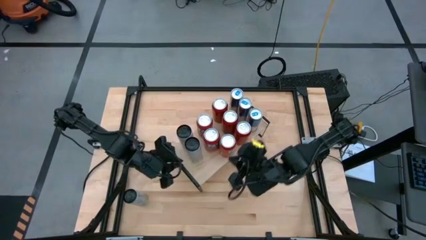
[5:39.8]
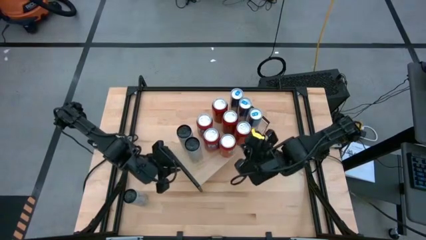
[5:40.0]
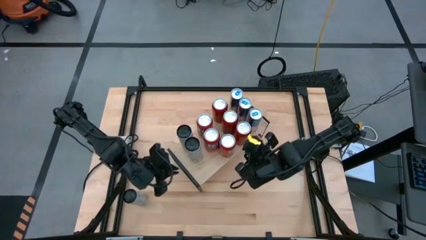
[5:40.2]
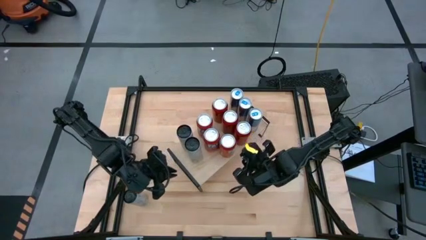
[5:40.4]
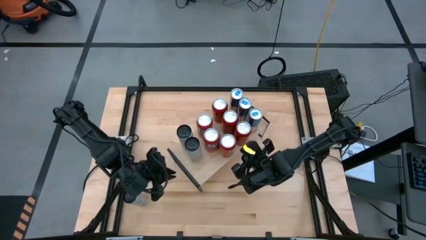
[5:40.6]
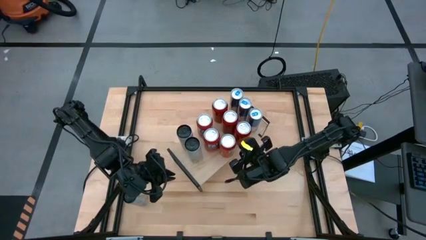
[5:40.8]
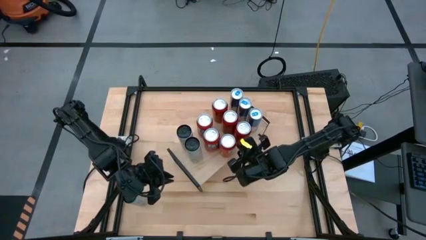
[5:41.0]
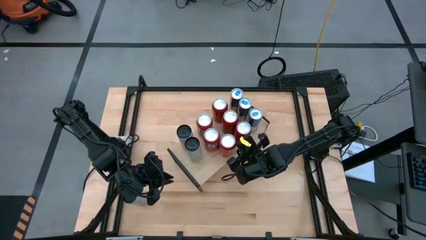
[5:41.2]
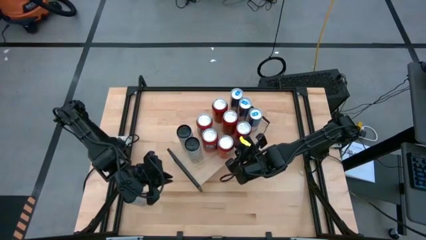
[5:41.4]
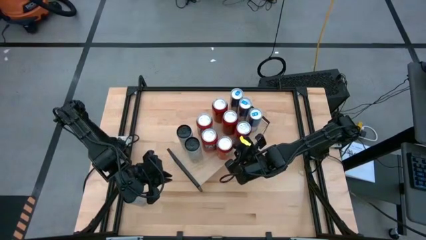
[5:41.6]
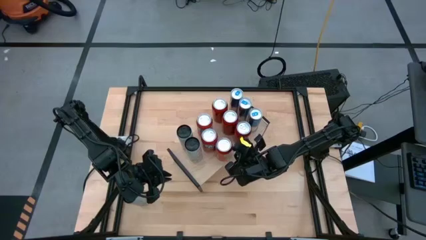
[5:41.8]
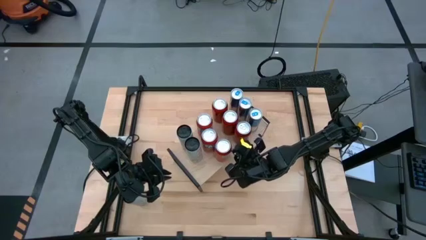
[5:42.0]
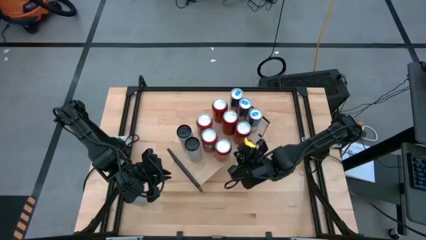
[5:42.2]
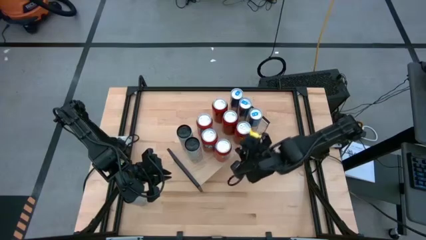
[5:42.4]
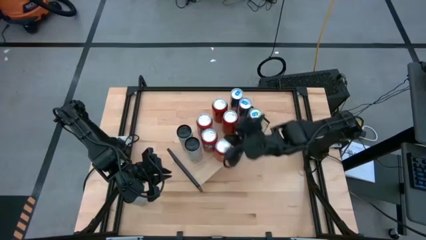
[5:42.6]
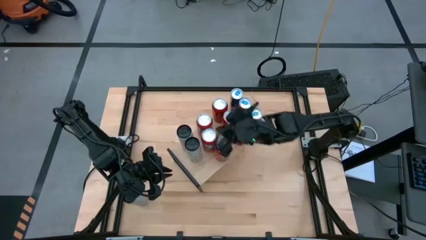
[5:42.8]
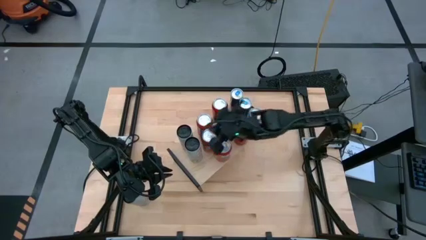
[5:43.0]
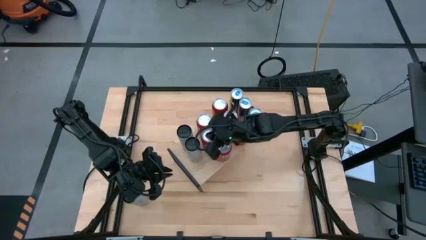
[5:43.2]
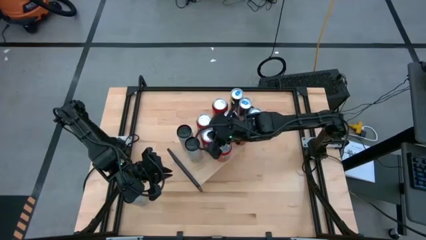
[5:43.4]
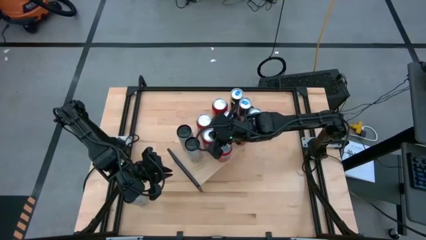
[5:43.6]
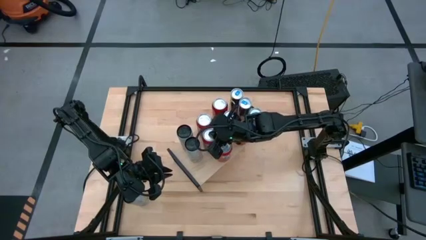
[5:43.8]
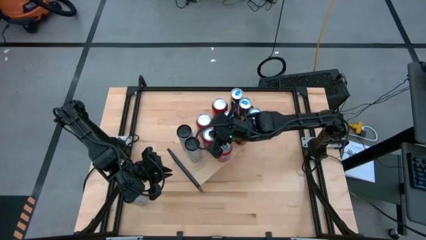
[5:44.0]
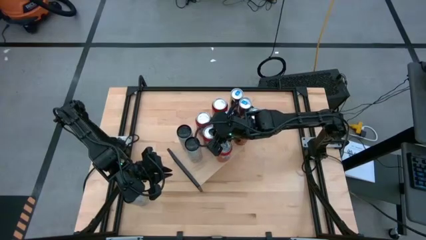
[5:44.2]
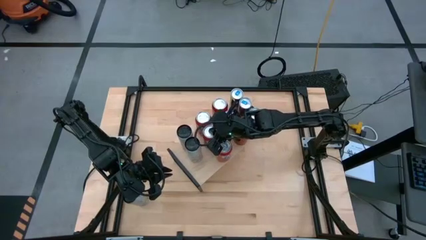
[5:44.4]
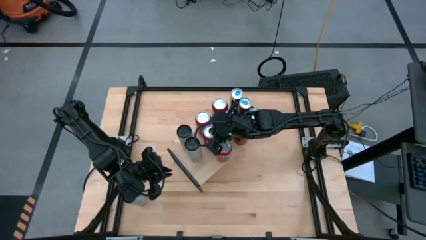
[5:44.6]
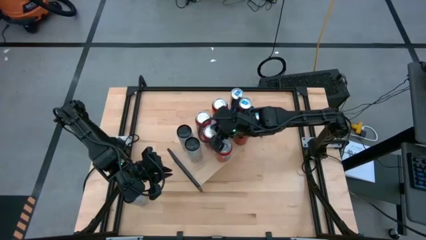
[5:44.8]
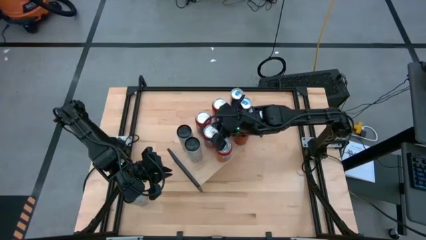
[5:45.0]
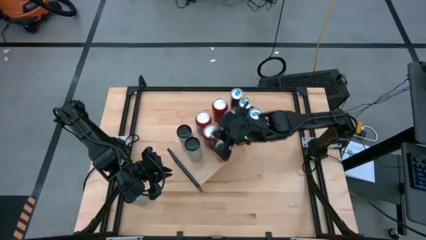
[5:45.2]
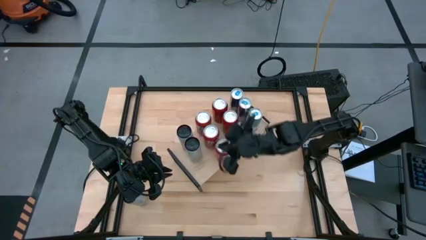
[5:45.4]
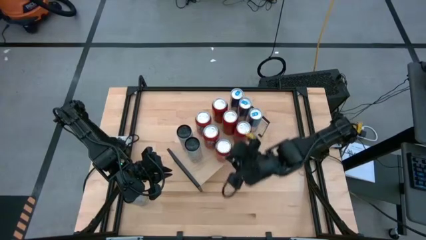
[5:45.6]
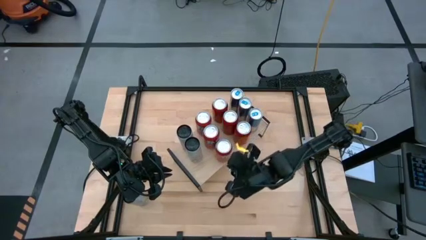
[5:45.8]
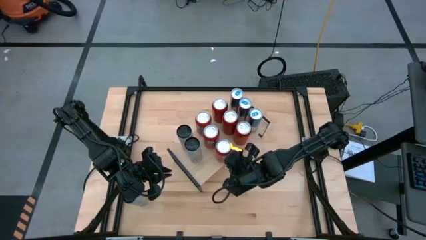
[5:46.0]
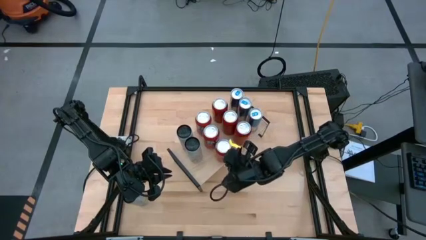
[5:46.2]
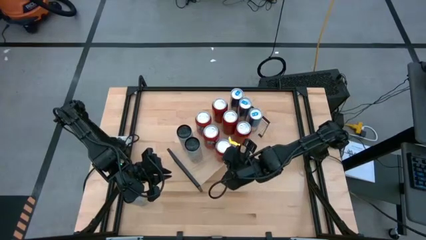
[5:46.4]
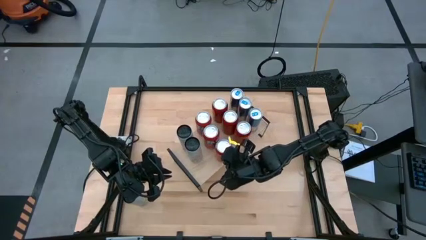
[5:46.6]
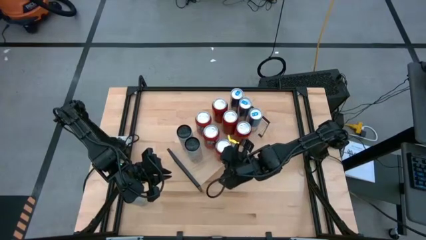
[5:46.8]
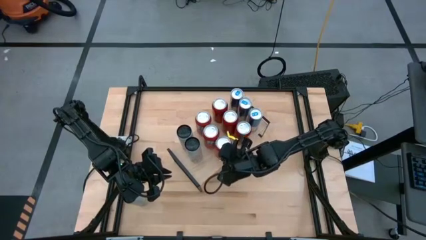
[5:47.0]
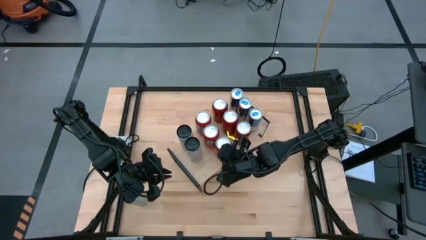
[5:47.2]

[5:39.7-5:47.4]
Task: Place canned beverage on shelf
Adjust the orange soda can

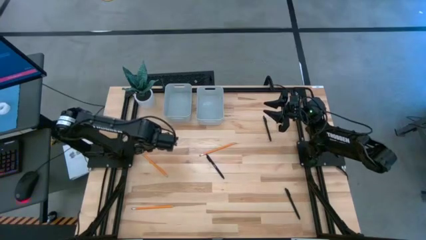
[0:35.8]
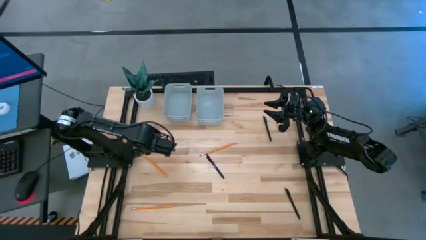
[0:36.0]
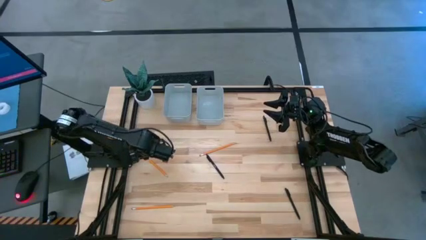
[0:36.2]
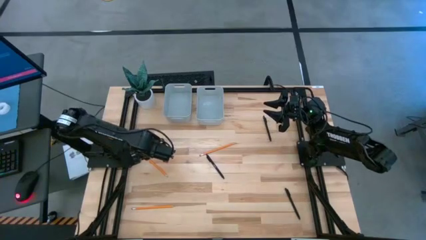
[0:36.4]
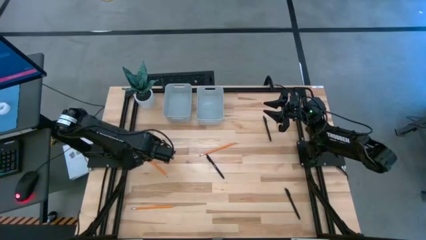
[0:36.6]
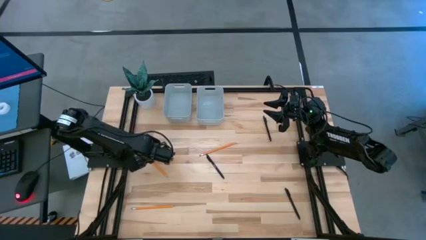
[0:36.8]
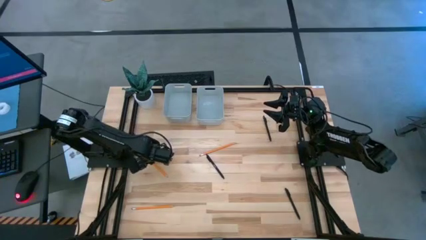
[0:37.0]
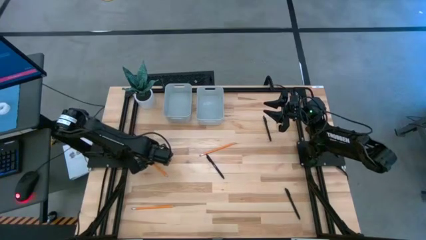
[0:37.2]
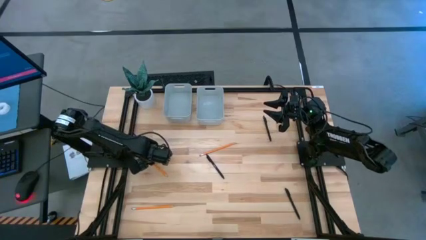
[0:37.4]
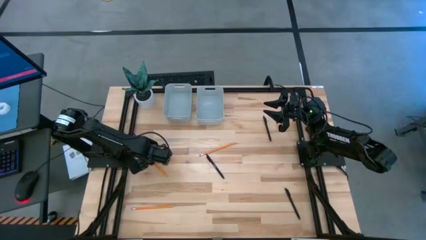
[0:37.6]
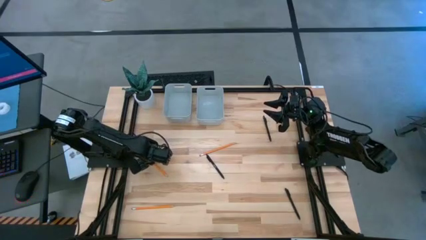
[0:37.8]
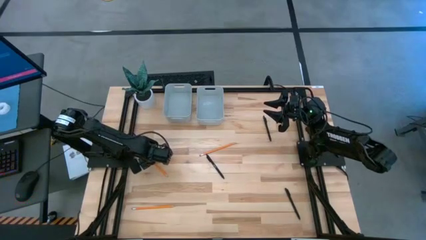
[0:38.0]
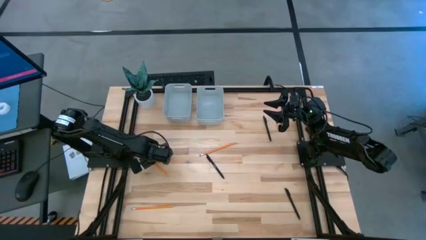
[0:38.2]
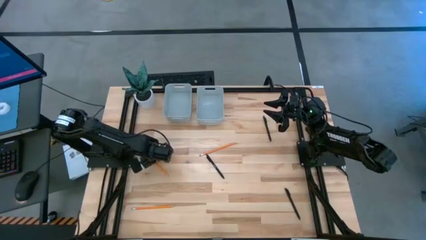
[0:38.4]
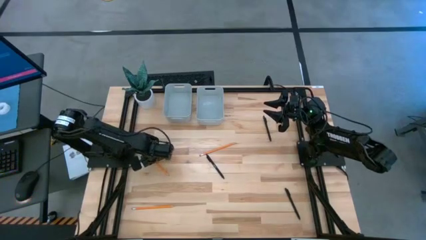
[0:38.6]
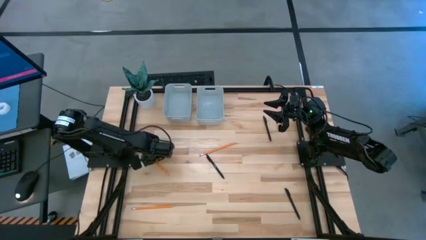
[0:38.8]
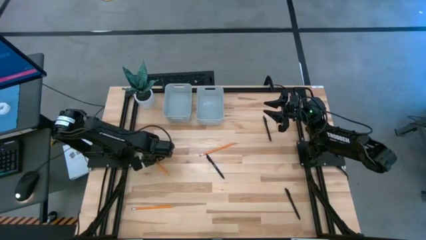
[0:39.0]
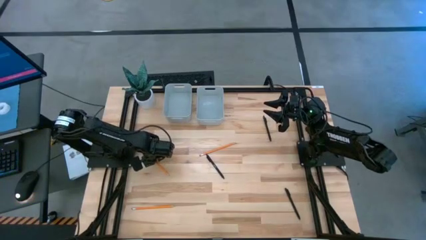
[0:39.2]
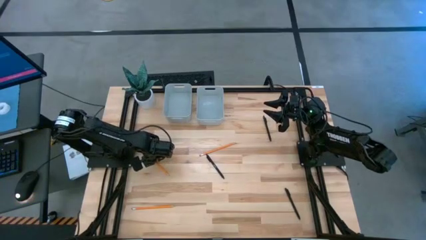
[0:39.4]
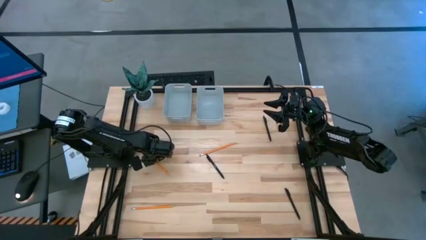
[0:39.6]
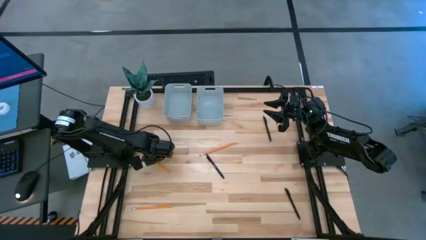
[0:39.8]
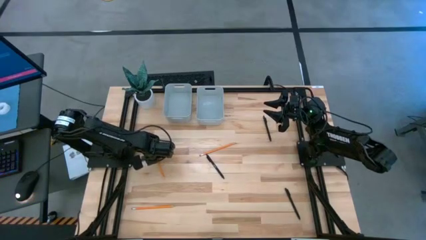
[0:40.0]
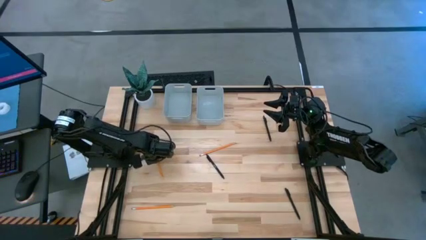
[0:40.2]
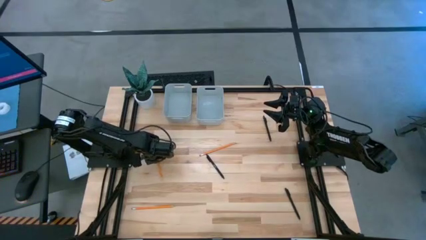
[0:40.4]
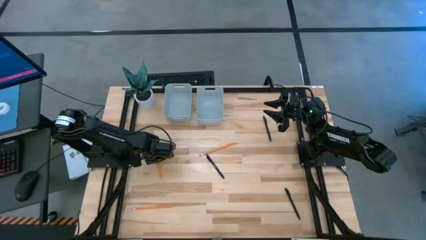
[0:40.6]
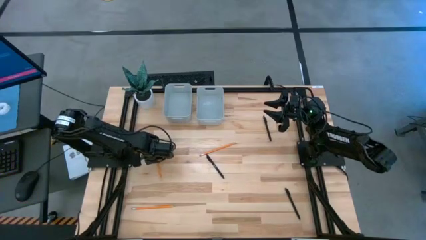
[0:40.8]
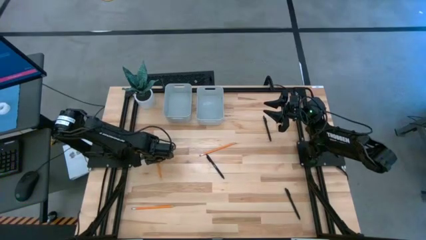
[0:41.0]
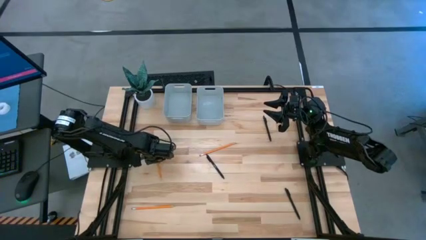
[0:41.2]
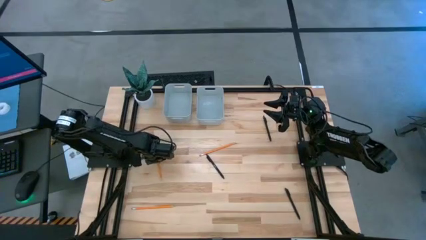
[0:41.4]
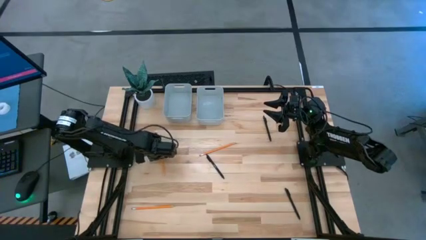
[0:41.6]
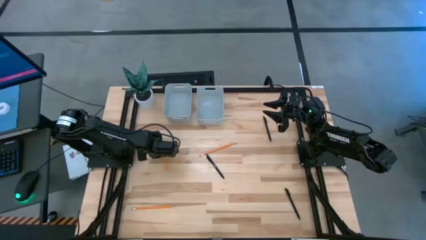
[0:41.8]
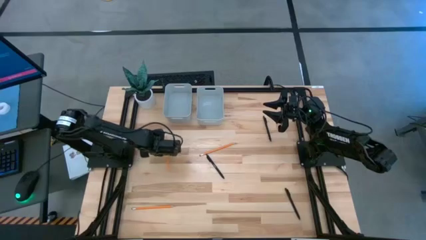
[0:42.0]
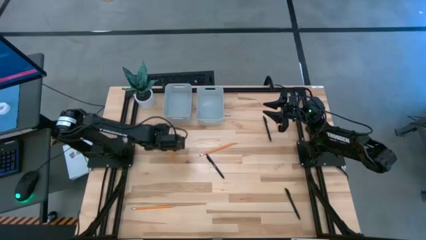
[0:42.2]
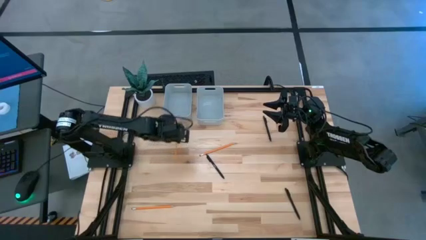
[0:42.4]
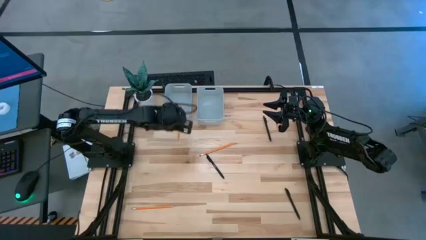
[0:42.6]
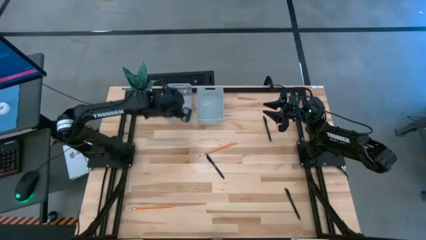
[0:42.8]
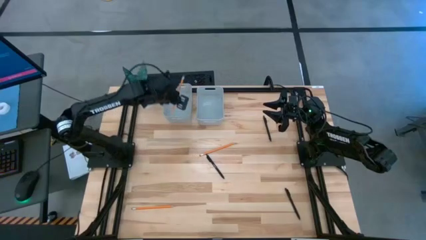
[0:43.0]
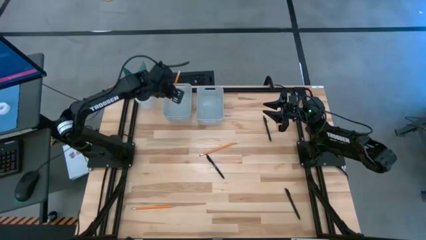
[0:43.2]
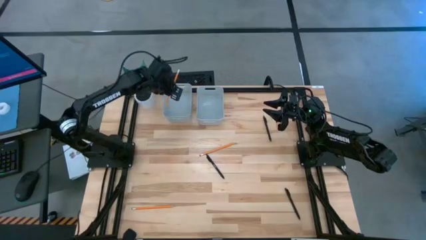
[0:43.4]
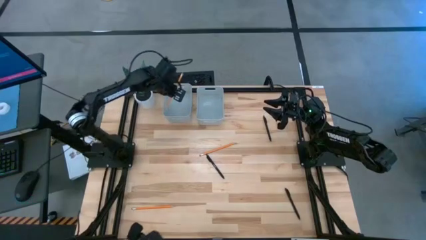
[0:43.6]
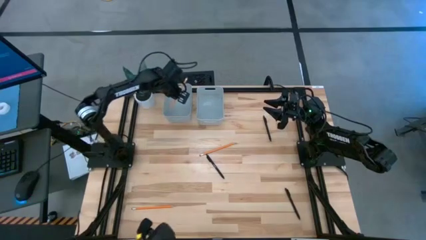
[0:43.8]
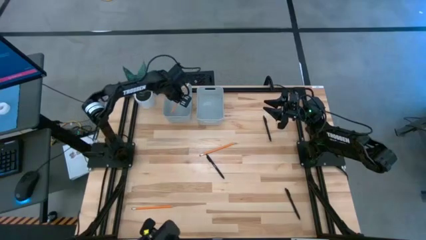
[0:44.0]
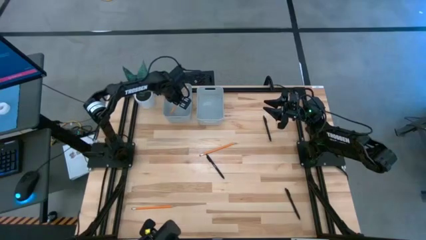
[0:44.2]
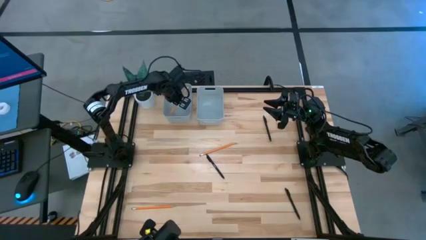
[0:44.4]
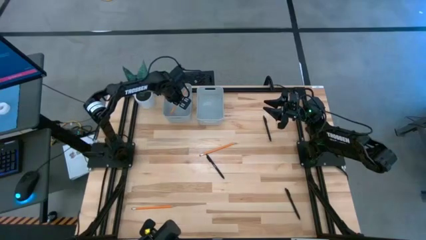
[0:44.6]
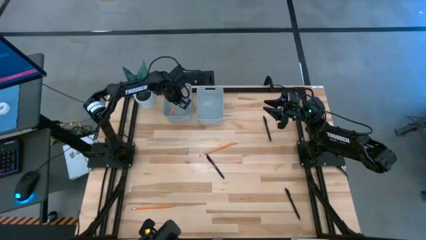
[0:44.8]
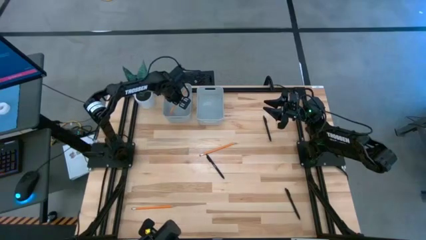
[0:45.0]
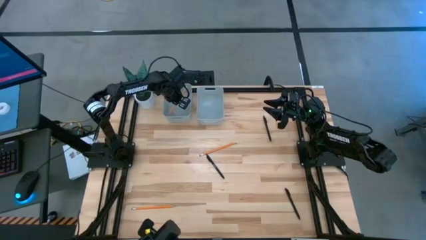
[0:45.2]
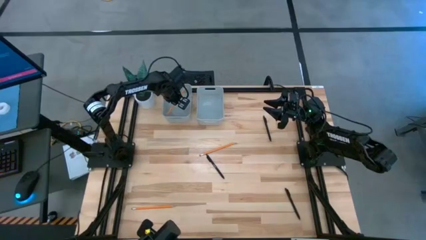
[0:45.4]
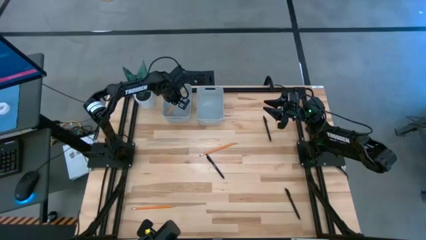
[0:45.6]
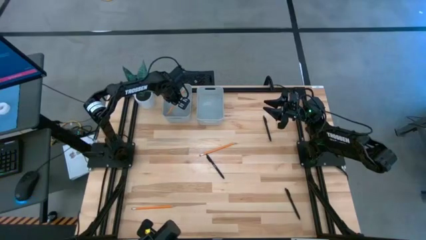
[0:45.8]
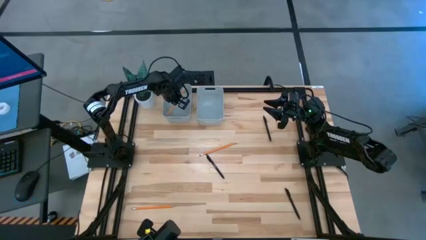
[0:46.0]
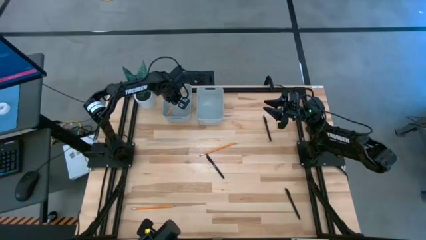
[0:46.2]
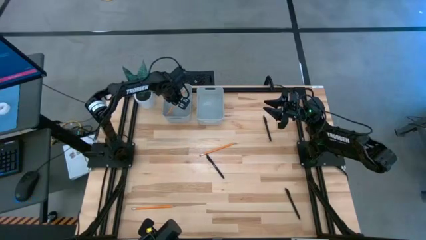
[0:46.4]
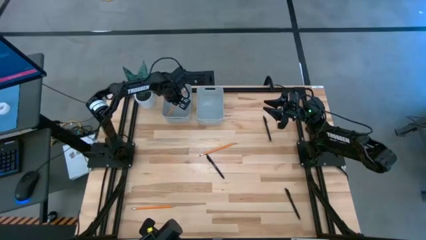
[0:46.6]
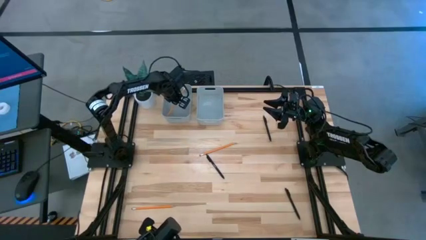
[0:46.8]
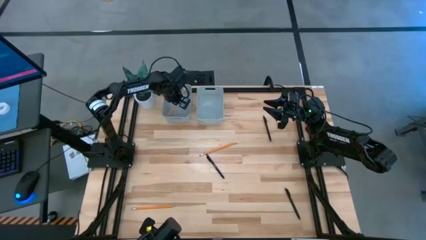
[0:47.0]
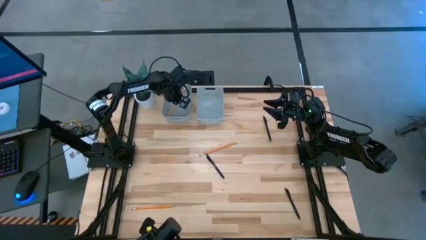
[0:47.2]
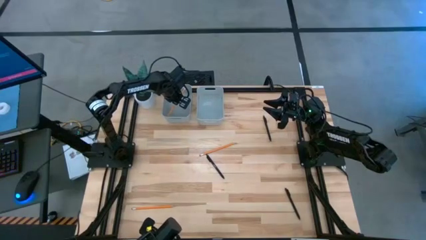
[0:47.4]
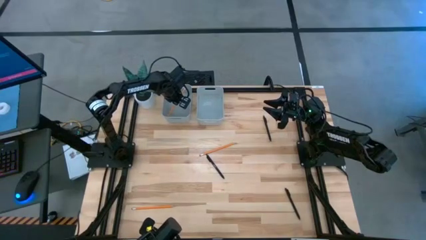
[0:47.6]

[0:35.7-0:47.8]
Task: Sort pens & pencils
Put the middle left pencil into the left bin
